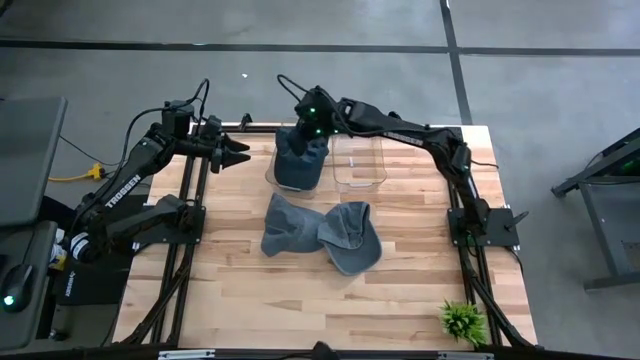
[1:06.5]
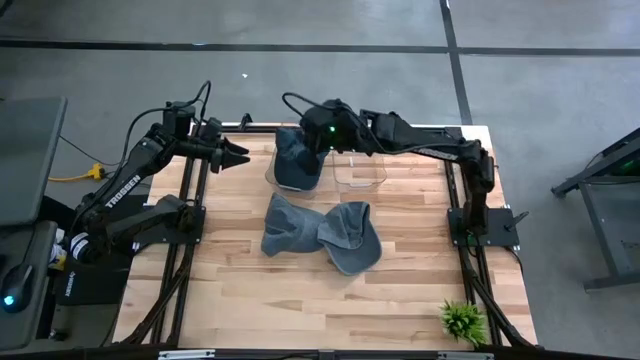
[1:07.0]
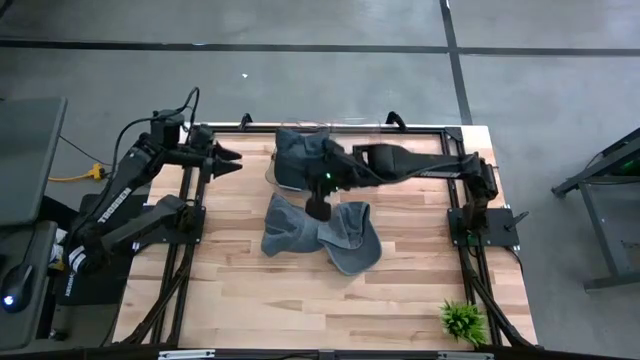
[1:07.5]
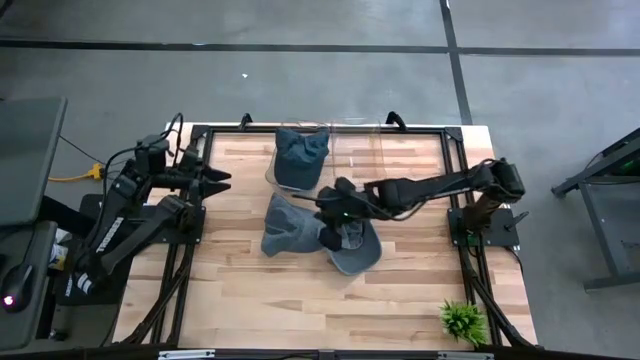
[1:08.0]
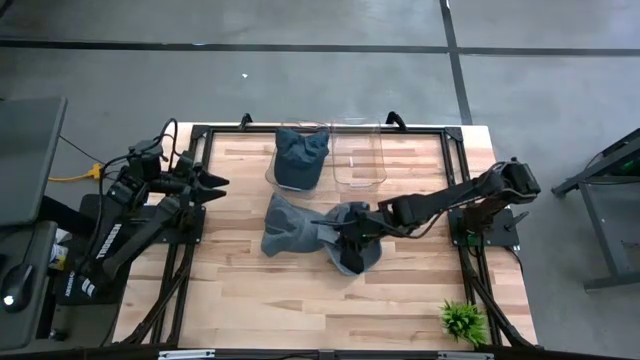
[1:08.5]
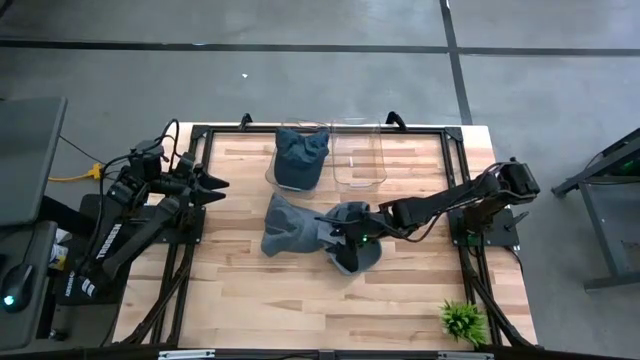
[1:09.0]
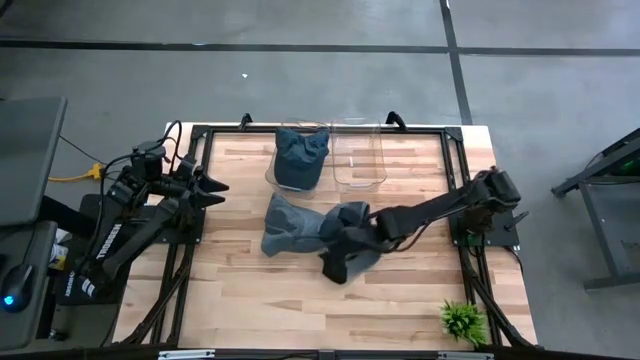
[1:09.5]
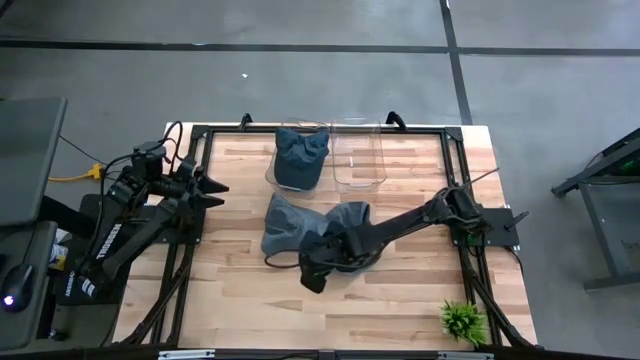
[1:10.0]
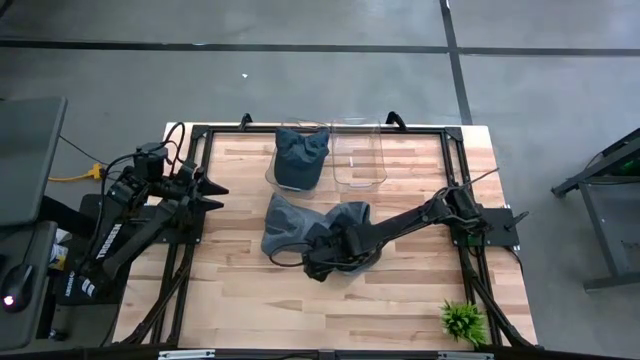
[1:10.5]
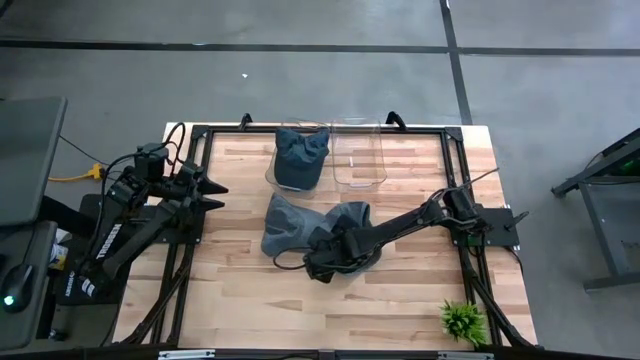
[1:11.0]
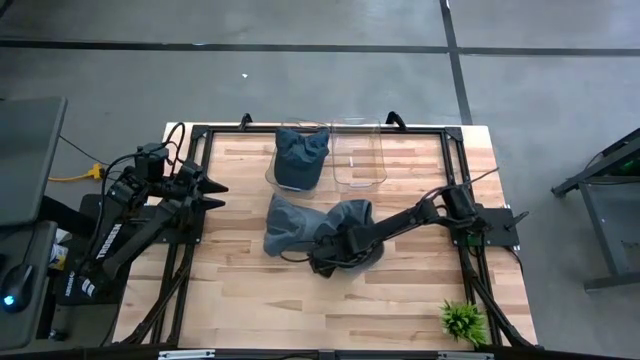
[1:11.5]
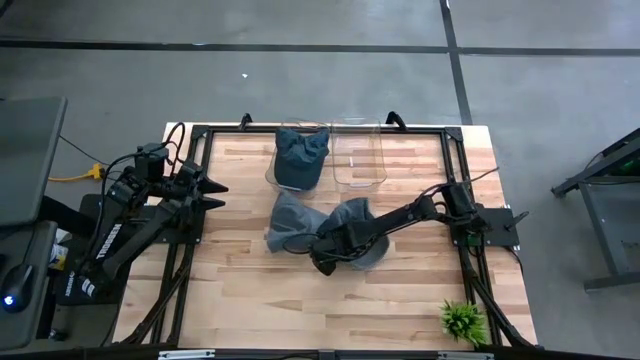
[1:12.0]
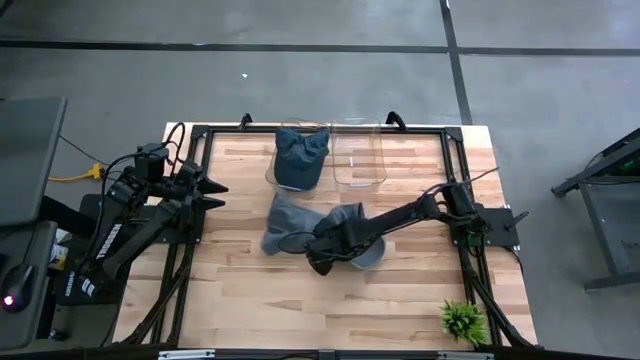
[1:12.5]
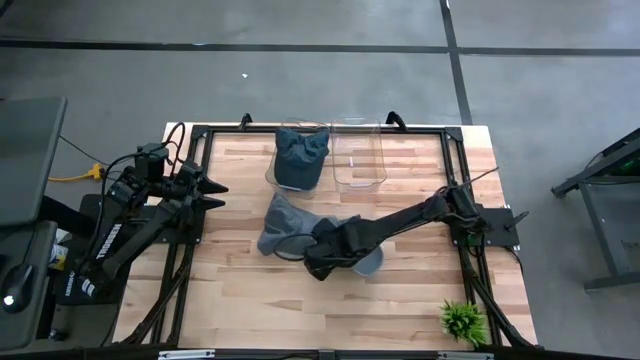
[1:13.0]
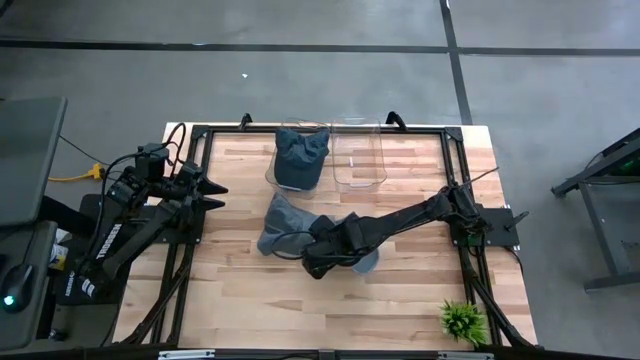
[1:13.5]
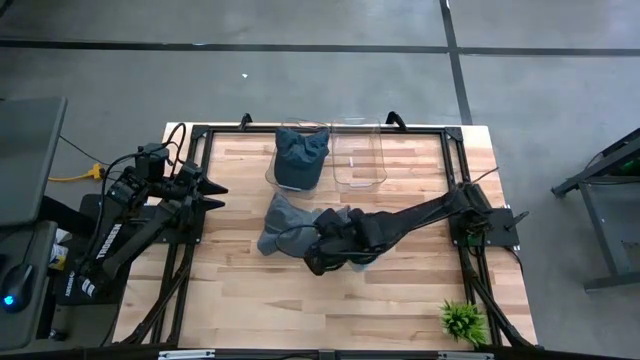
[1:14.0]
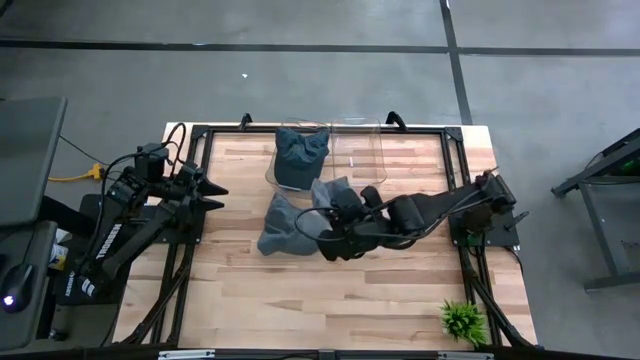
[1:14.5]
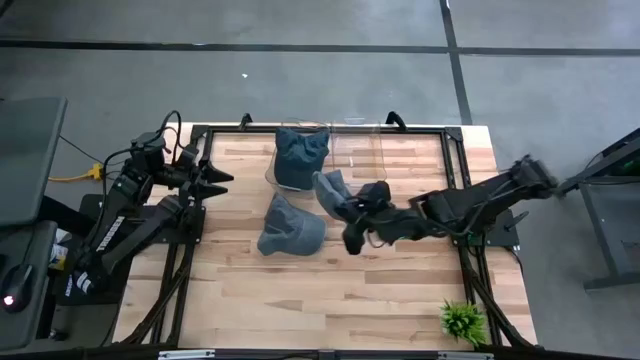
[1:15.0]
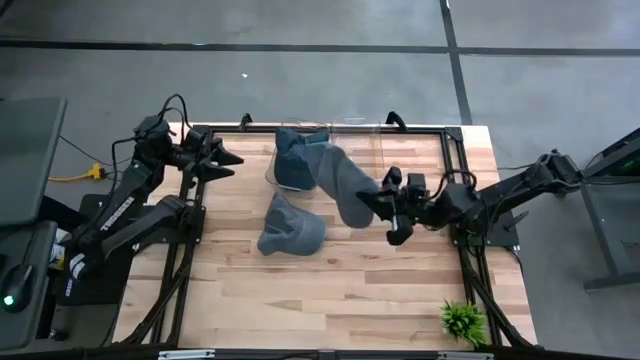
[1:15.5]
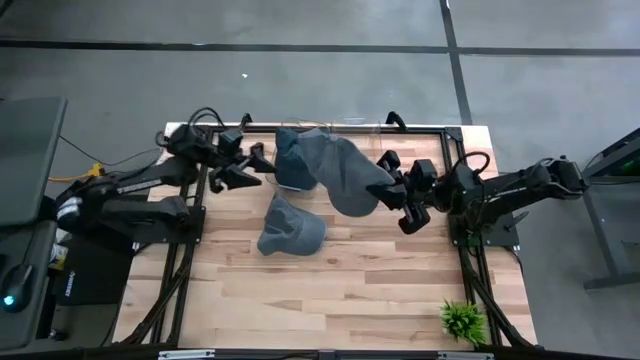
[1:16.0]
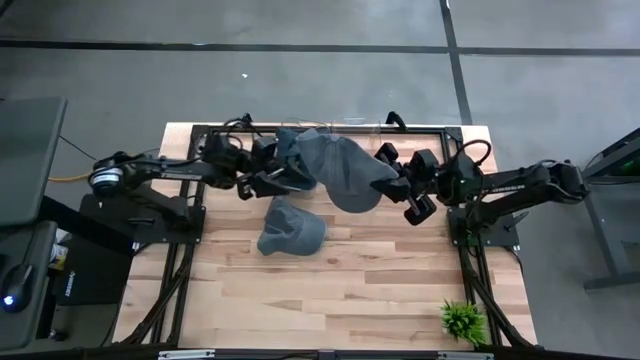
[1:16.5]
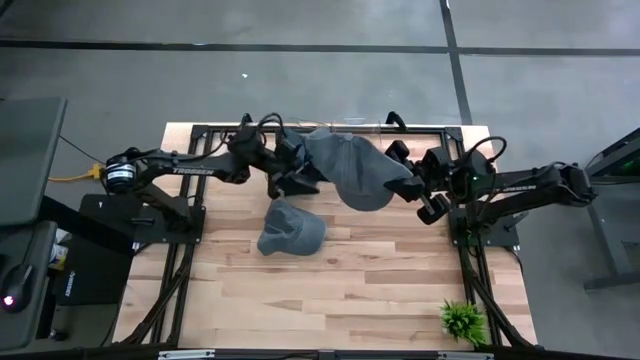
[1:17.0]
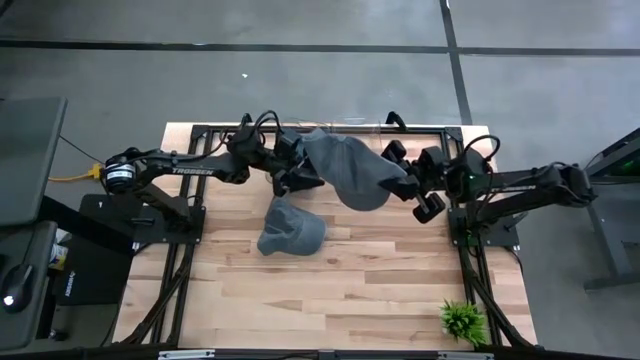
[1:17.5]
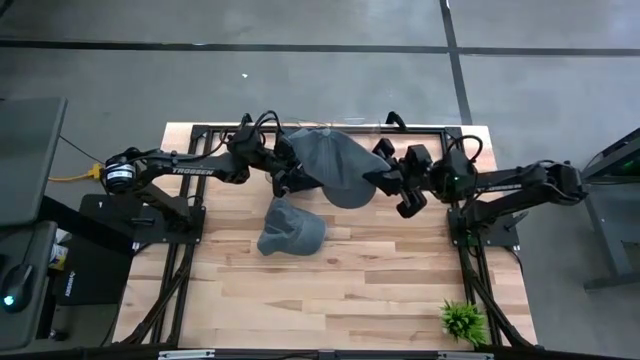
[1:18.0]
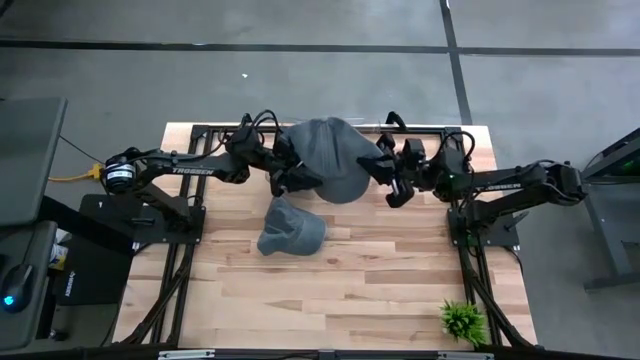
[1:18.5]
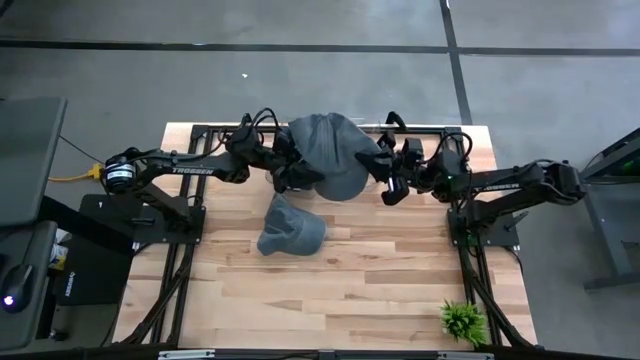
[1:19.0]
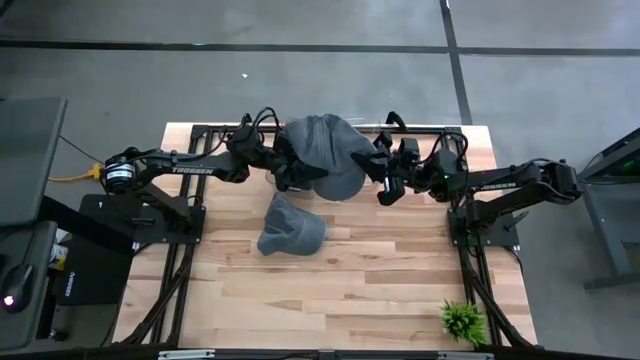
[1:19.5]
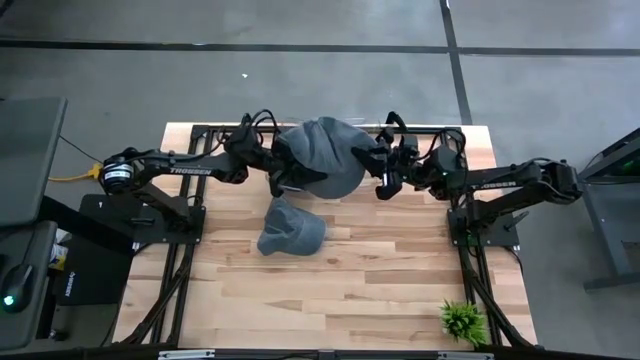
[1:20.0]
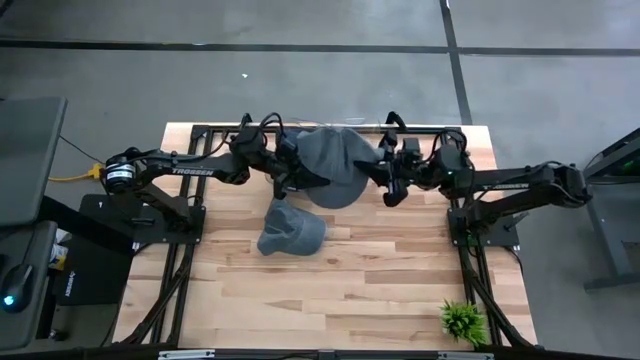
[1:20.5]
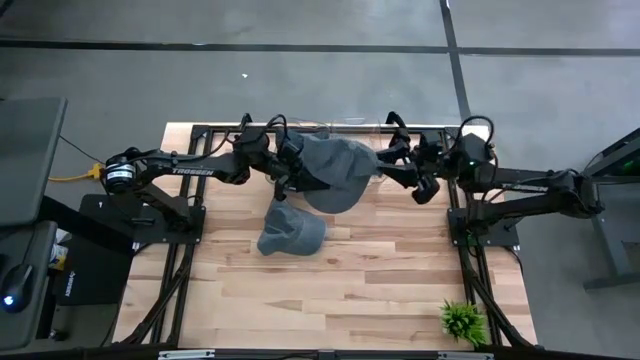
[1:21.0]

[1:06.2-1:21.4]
Task: Pick & Place hat
Put the right gray cap into the right transparent bin

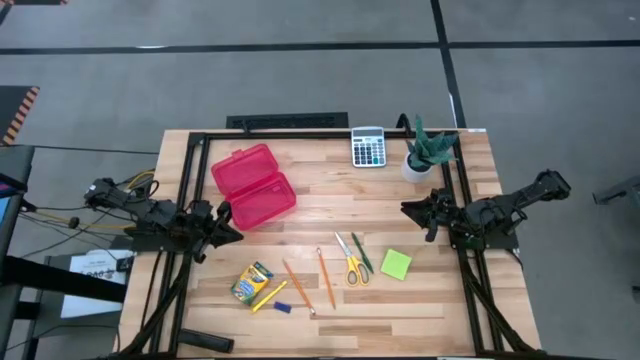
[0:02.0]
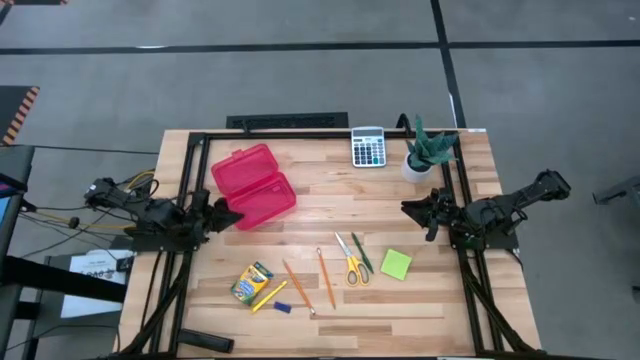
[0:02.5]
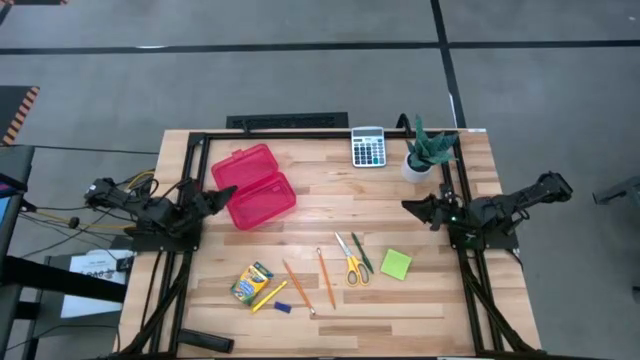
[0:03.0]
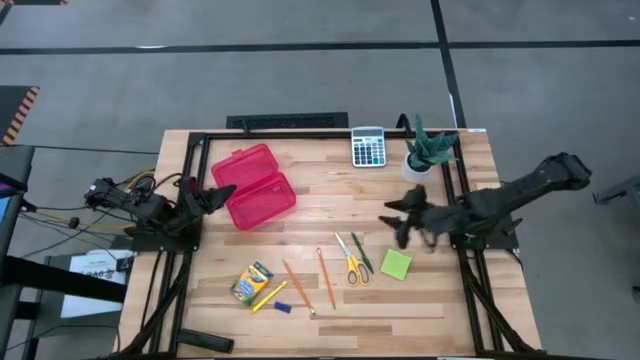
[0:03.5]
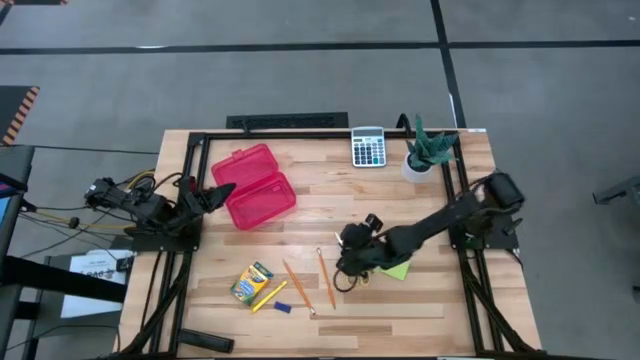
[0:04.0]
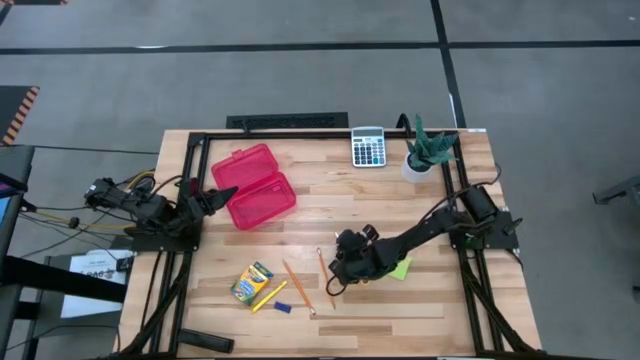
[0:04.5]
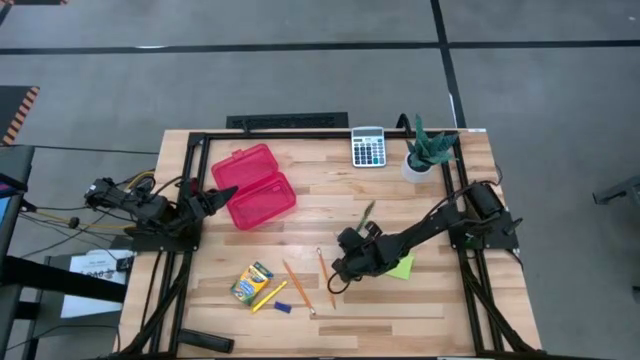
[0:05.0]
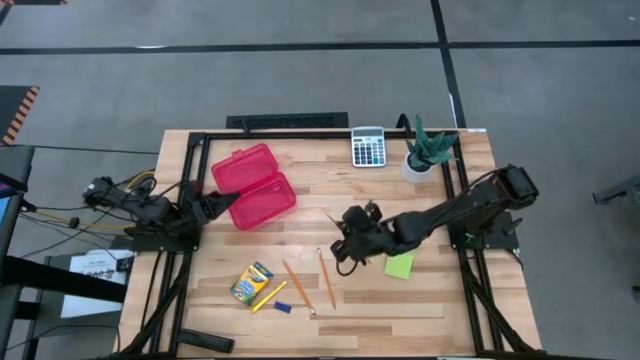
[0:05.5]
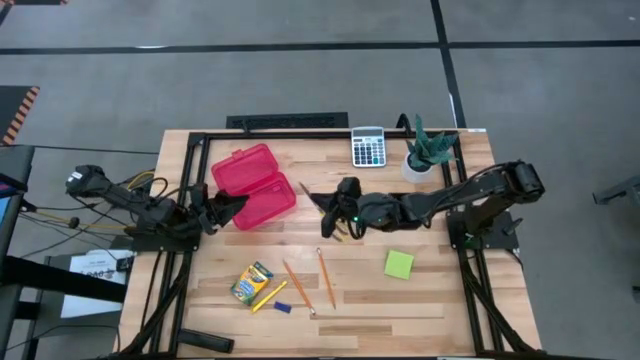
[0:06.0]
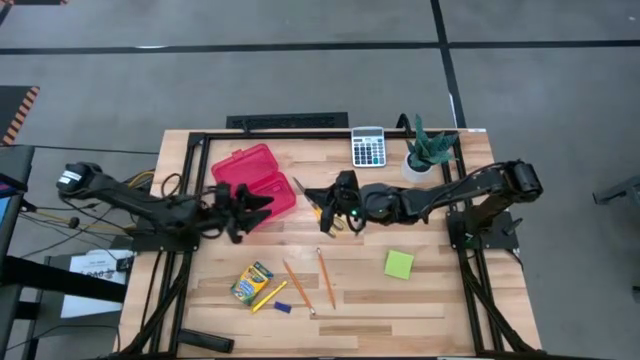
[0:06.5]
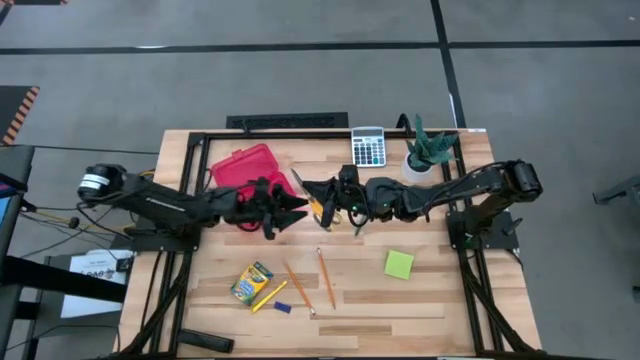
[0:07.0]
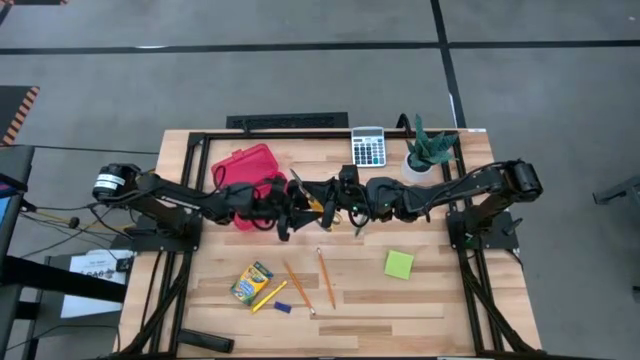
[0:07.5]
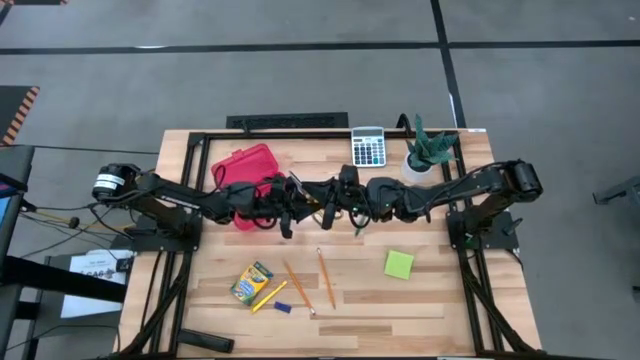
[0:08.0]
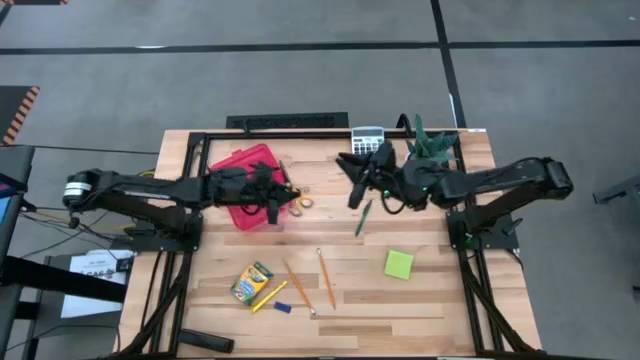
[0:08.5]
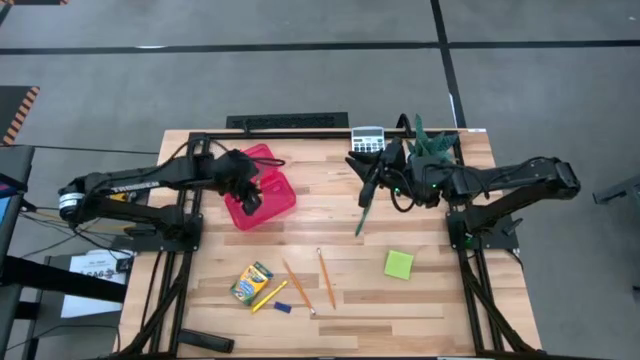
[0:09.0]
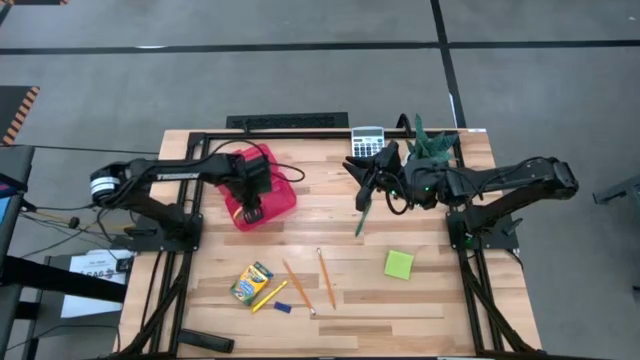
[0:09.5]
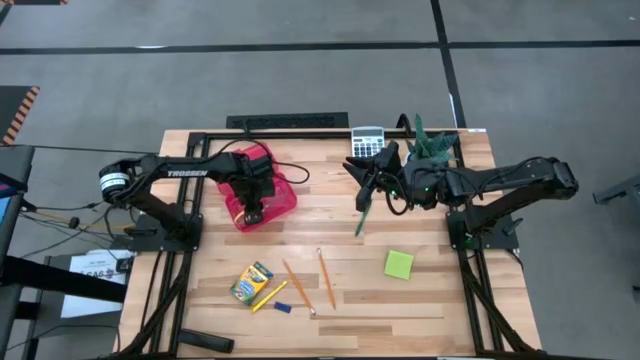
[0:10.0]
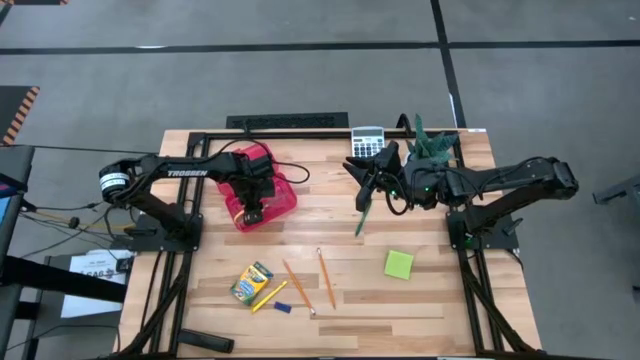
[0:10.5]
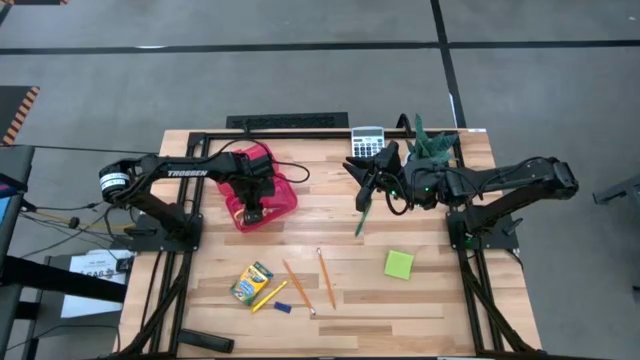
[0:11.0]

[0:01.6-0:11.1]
Task: Pack school essentials
Put the yellow scissors into the red supply box
